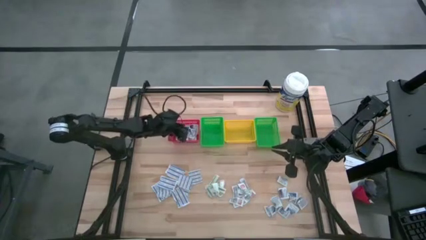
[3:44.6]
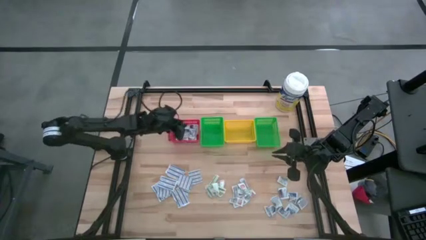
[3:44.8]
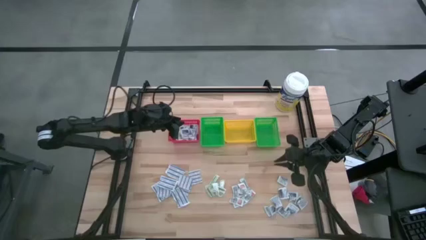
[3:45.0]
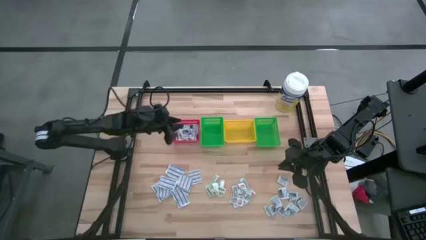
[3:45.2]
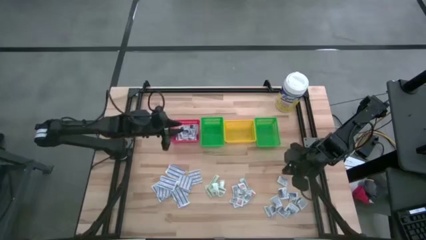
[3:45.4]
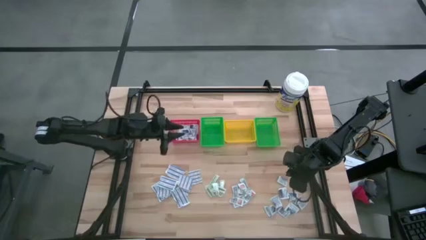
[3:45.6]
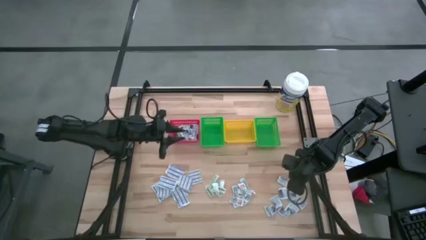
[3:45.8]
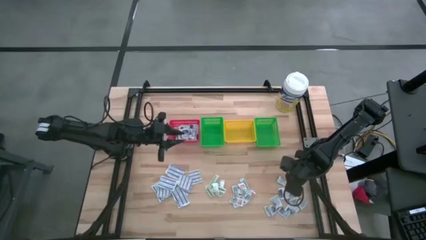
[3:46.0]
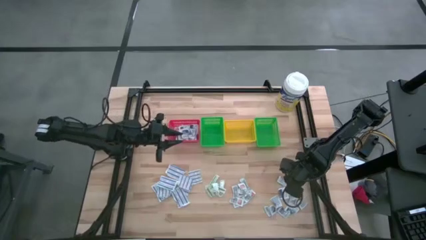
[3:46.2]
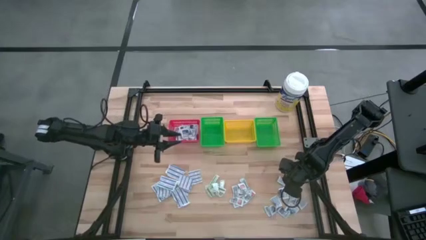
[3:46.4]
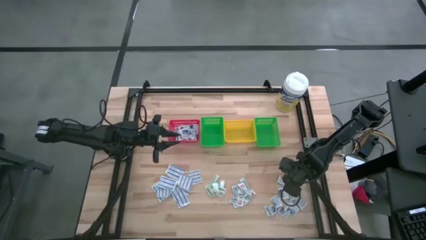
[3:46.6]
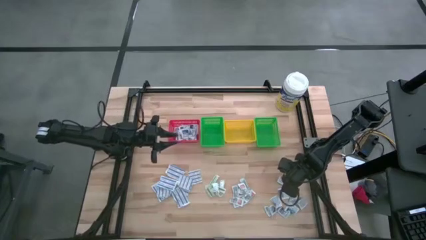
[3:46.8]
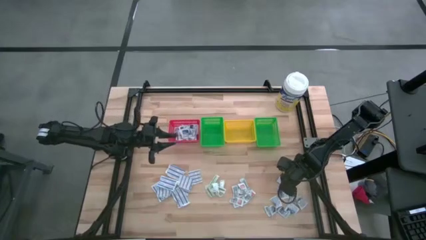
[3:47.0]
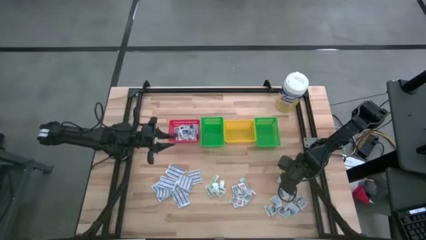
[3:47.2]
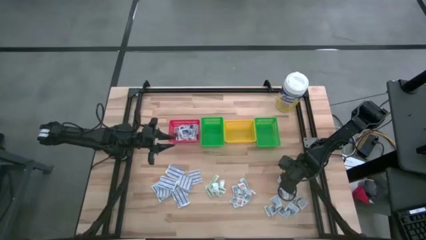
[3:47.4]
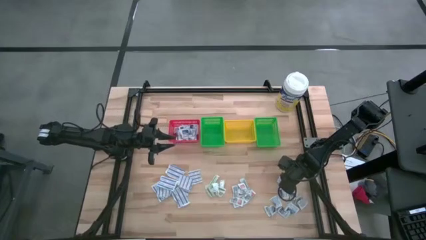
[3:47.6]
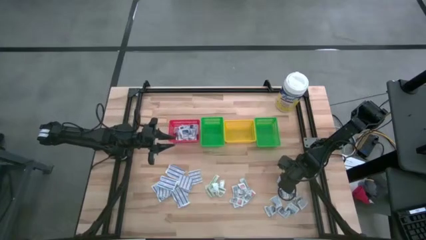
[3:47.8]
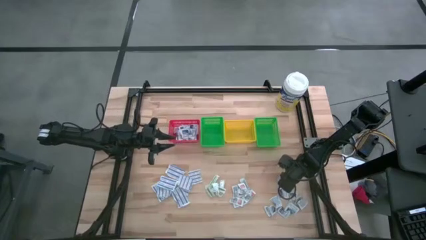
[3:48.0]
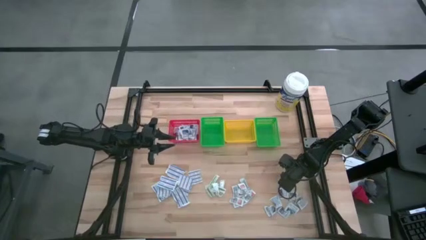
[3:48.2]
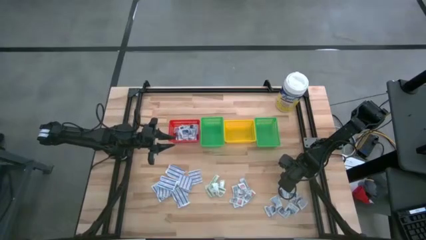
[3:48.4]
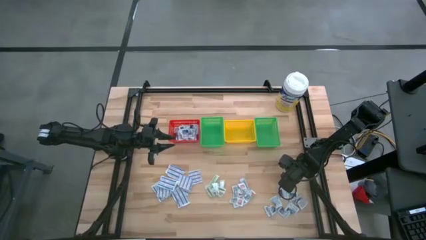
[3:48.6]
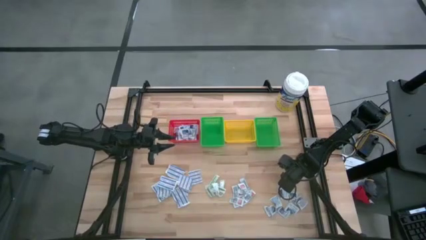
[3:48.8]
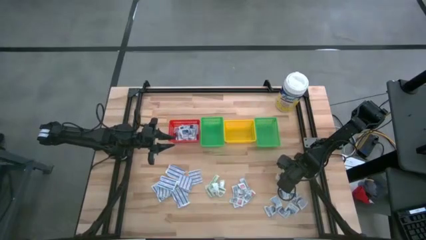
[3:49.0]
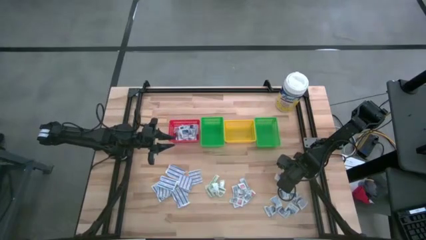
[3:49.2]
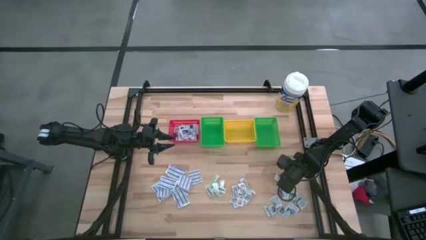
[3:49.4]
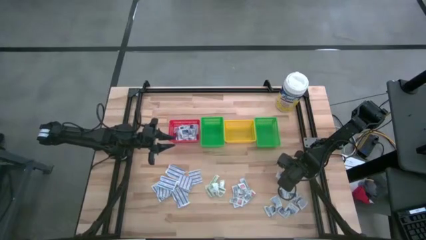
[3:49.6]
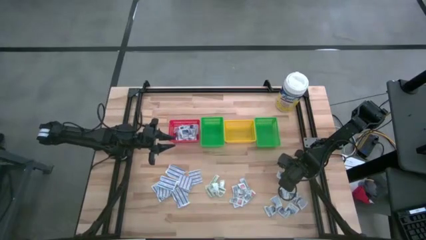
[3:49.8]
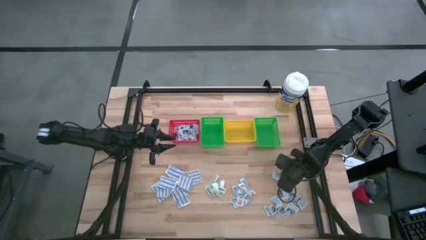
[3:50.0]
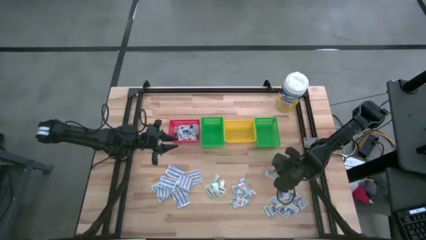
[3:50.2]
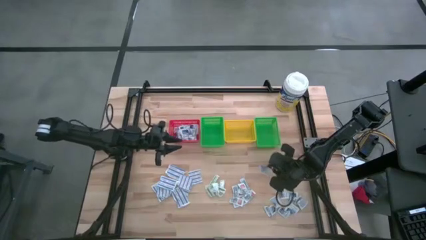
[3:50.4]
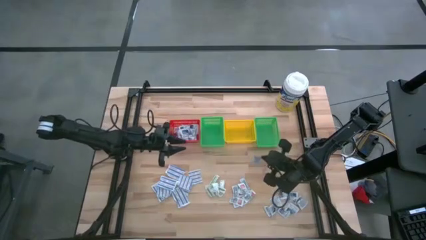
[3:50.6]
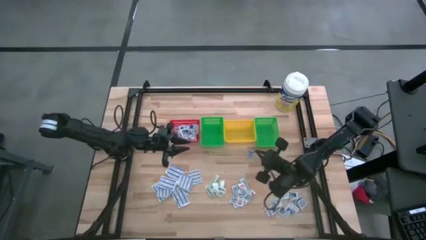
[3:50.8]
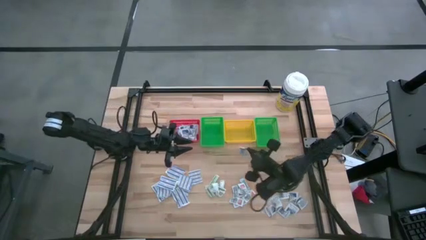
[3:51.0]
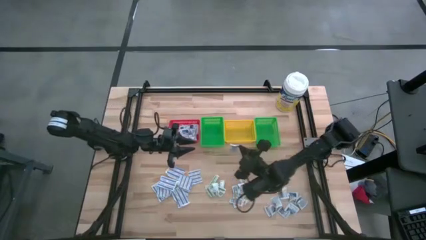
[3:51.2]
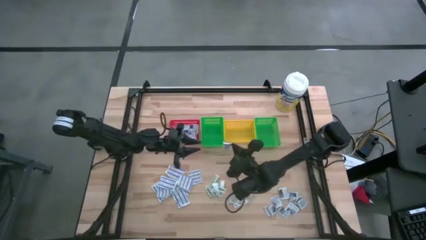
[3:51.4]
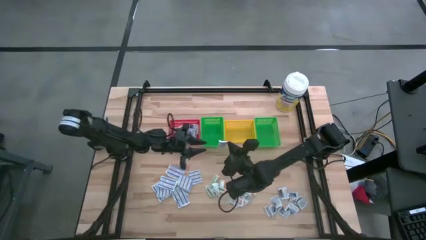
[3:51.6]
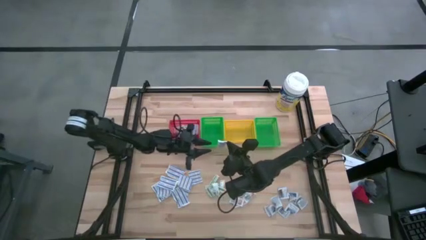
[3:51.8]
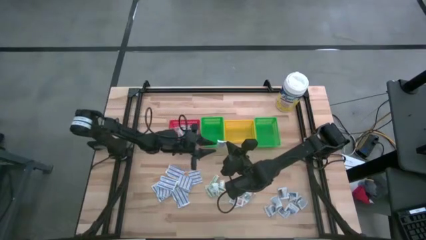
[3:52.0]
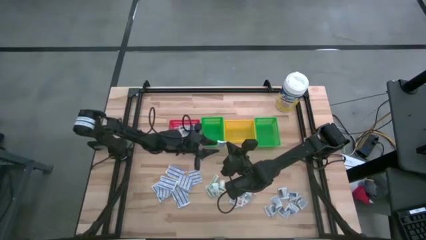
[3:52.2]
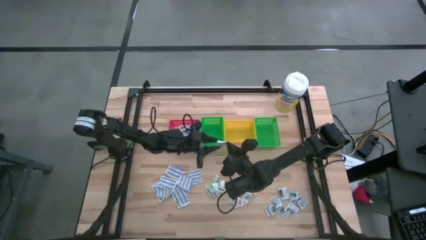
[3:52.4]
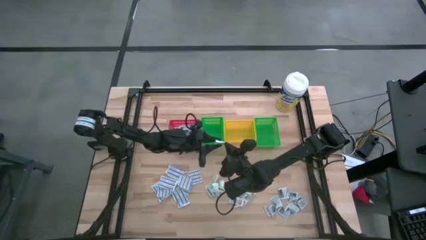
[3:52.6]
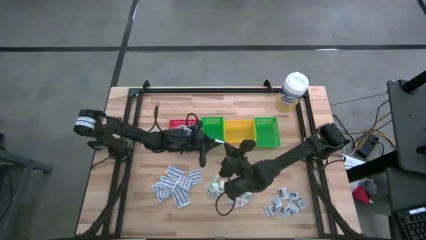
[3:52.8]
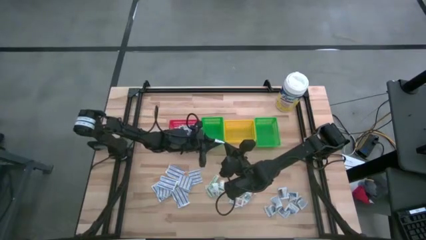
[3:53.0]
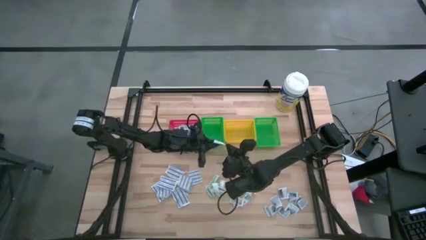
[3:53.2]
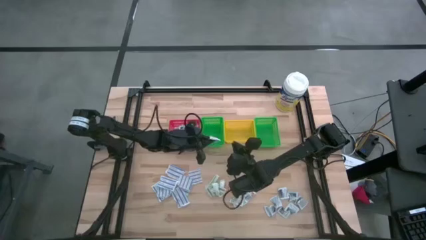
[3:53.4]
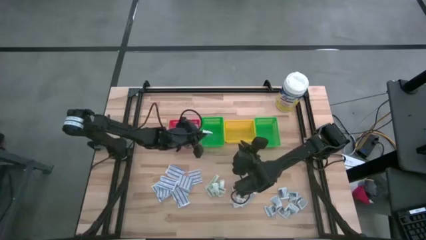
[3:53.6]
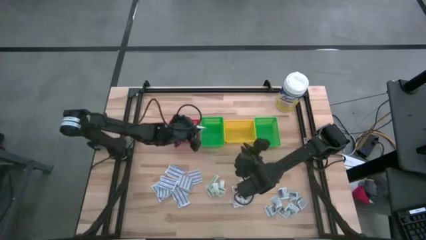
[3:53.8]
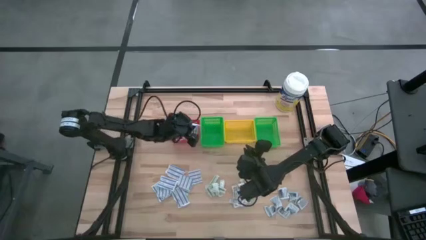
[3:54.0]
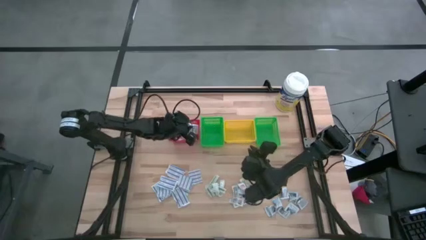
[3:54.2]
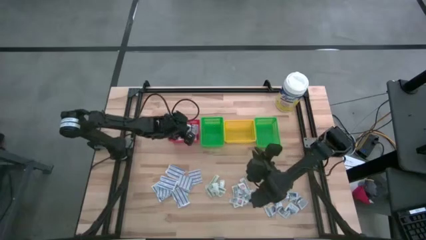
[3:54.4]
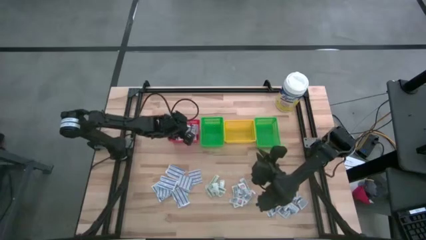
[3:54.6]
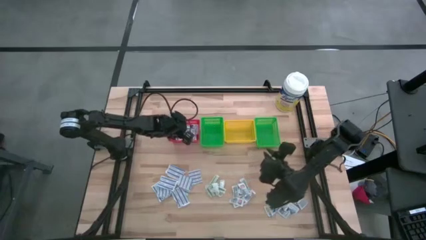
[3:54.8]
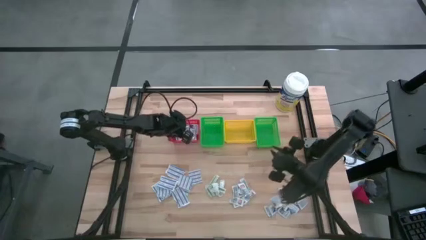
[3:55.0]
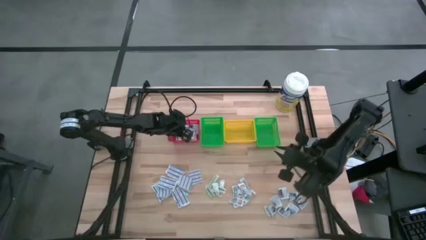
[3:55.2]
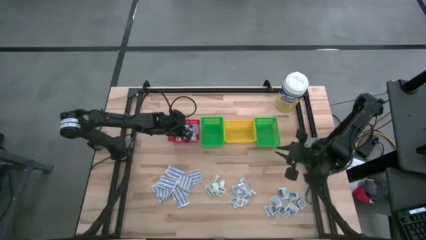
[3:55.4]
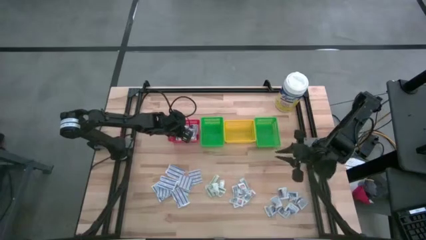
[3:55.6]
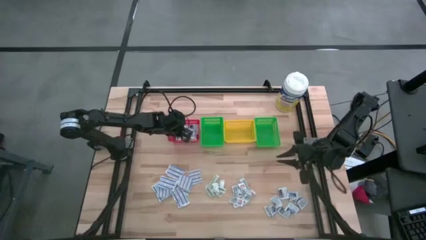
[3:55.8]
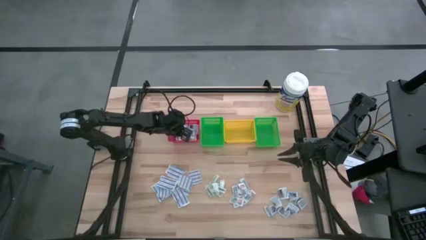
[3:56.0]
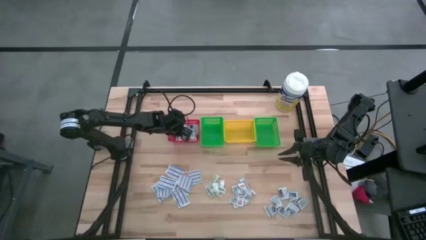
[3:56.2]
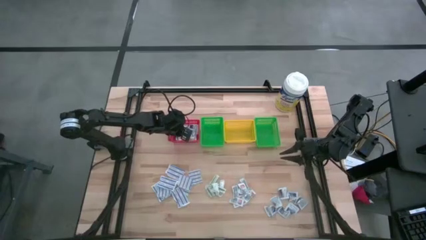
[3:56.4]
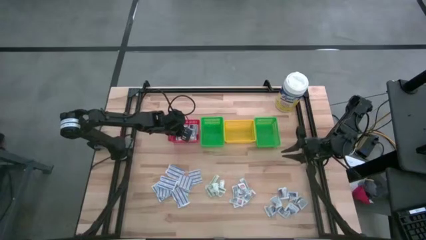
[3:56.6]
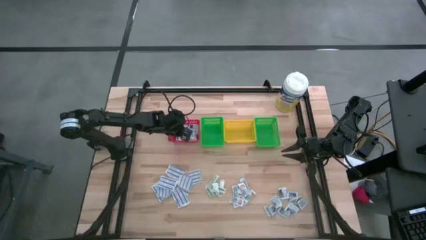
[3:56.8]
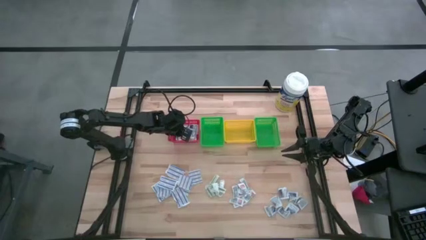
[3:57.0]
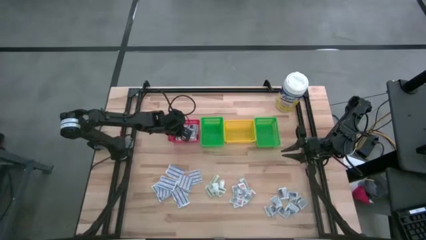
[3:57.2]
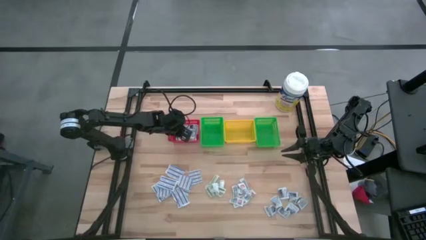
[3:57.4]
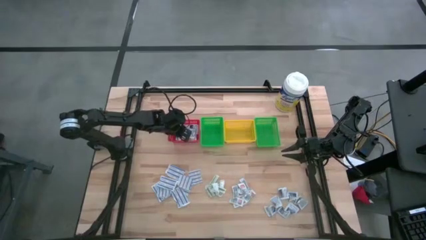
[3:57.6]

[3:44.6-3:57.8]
Task: Pick & Place First Aid Supplies
Put the alcohol pad into the red basket
